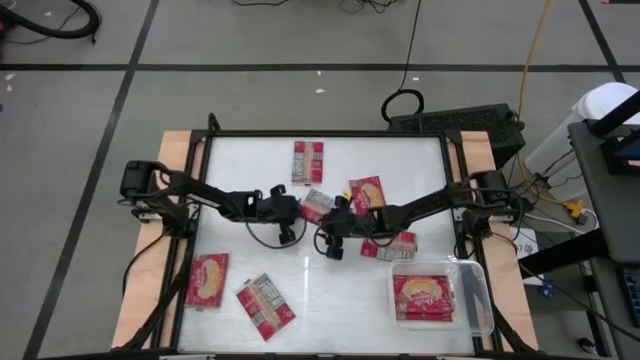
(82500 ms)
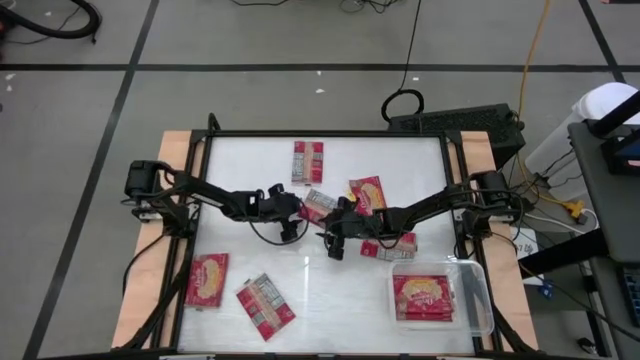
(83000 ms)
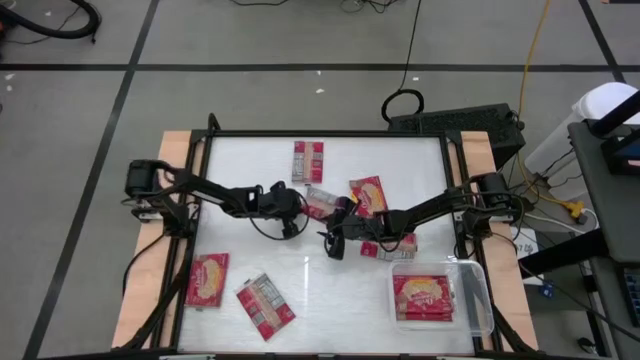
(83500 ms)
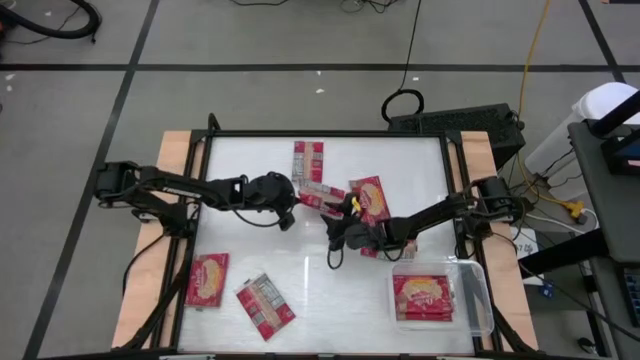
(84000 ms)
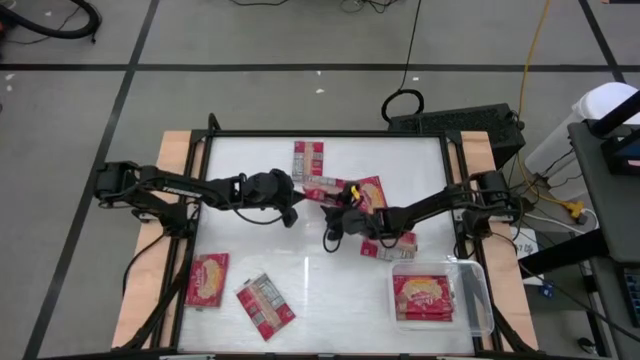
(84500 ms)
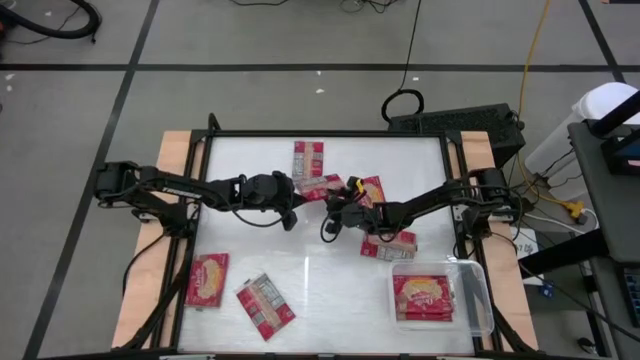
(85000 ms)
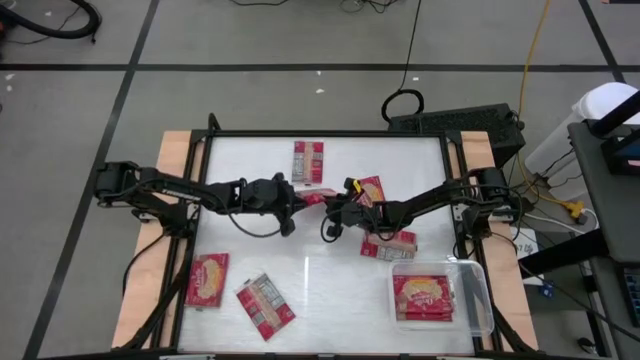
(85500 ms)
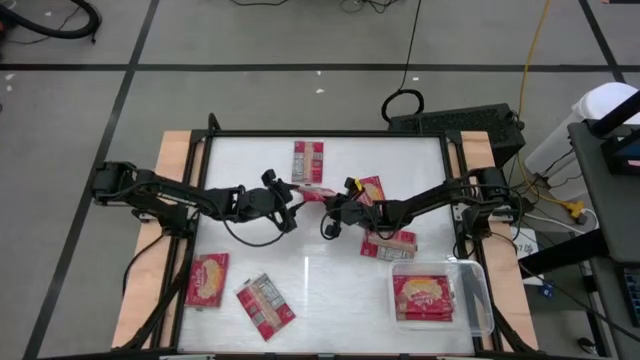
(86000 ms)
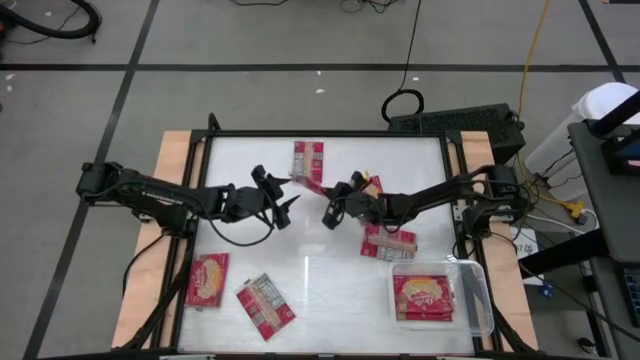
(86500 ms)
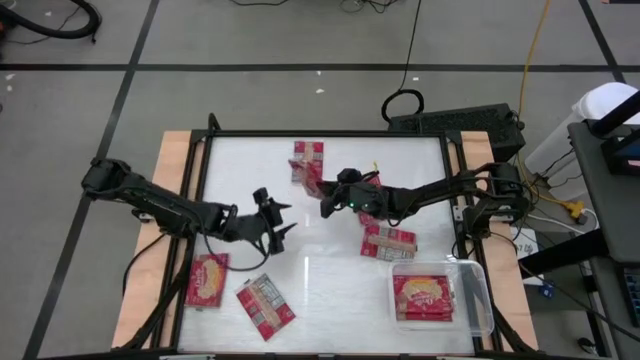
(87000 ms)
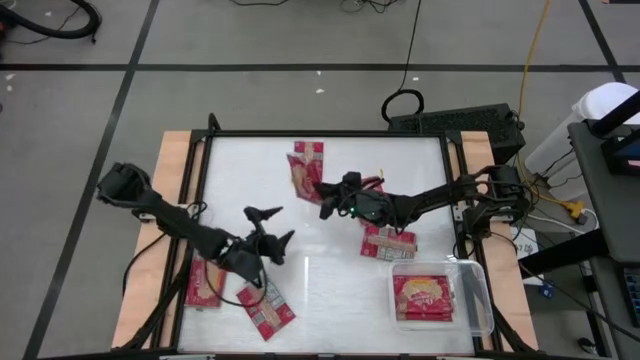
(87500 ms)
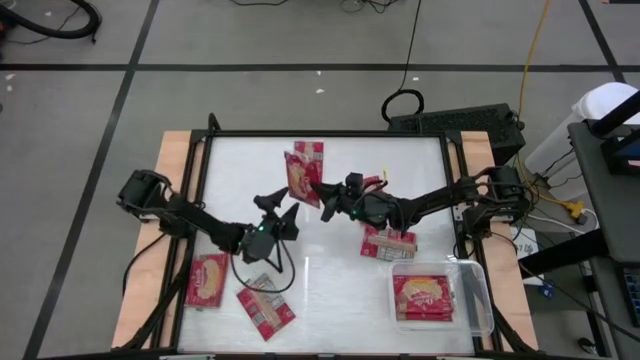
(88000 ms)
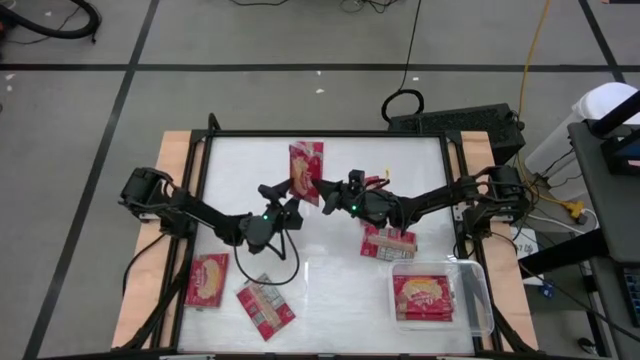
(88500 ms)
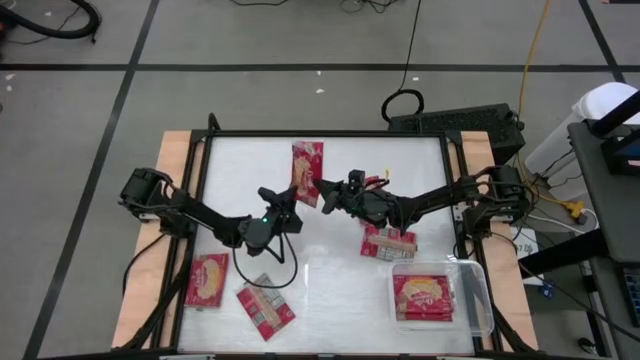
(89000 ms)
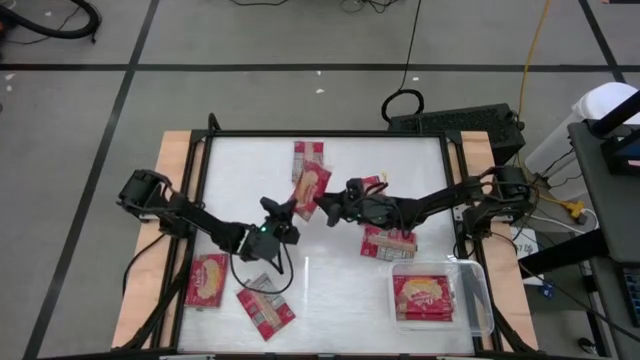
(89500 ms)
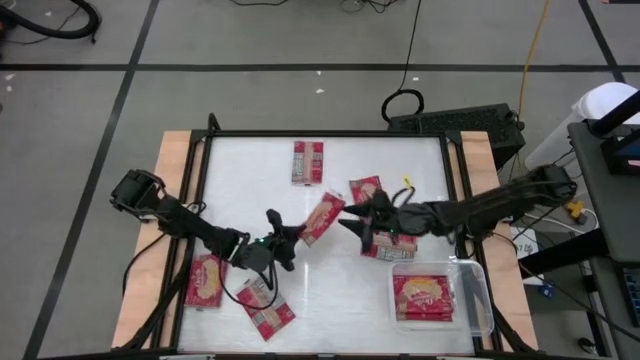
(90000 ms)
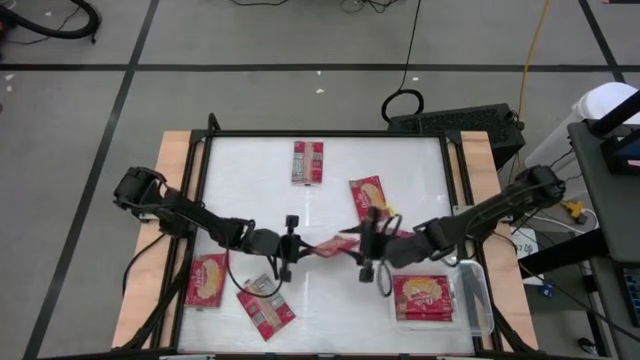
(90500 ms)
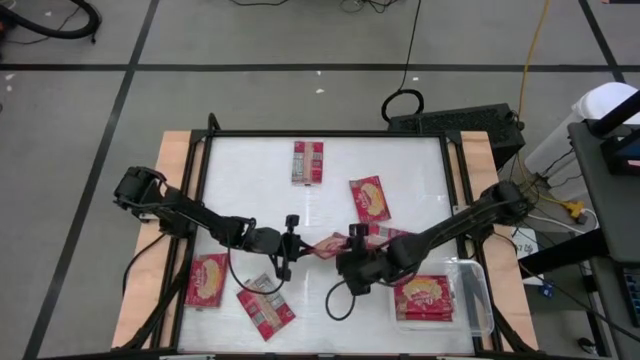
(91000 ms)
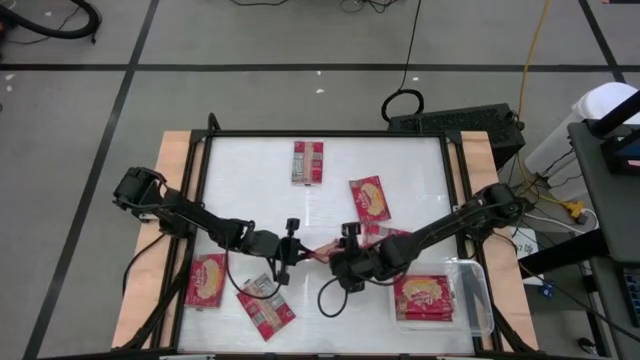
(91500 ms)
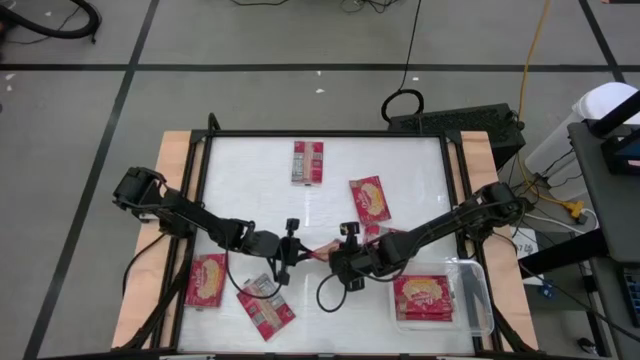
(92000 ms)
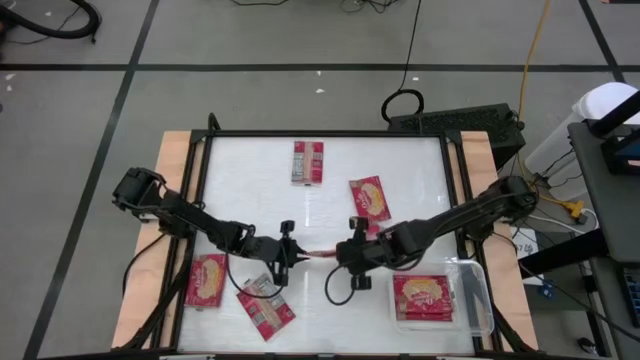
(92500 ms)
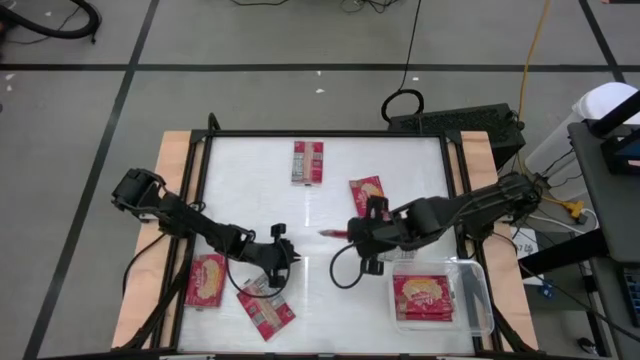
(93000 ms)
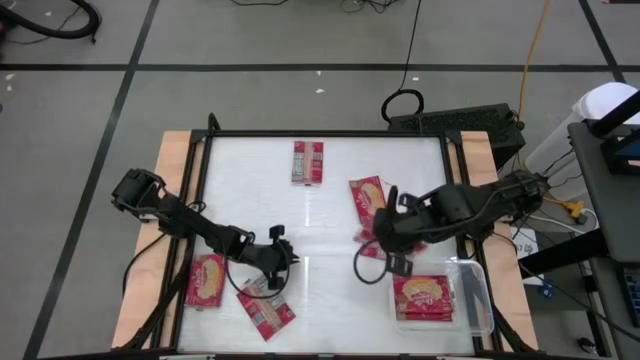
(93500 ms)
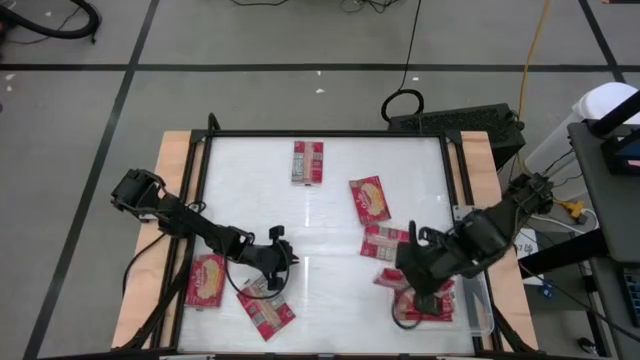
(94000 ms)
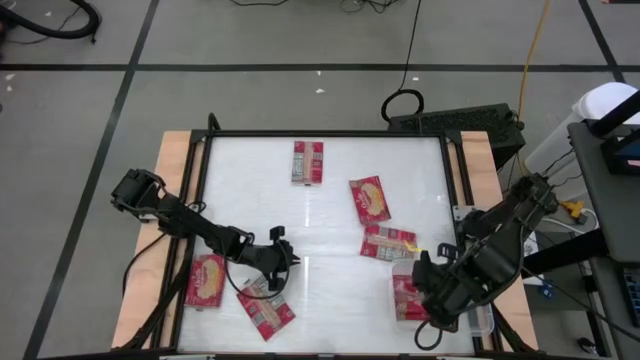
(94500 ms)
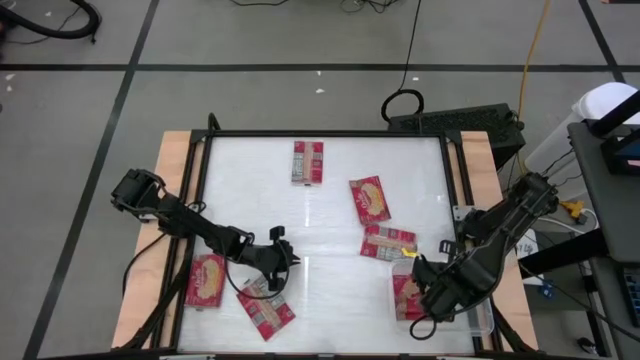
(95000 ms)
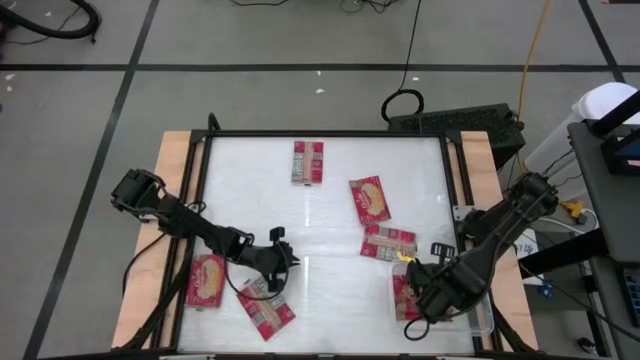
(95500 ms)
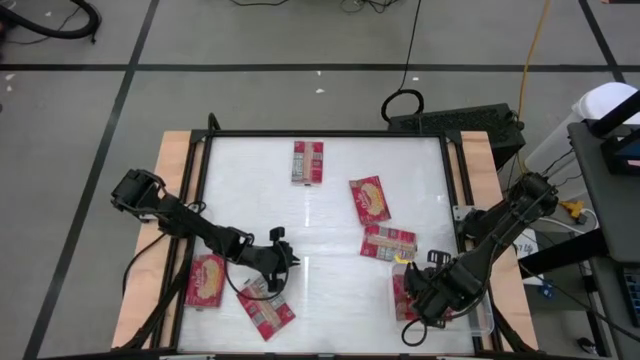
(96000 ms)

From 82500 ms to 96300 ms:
Task: Sort popcorn bags into baskets
Put the red popcorn pack into the transparent bin

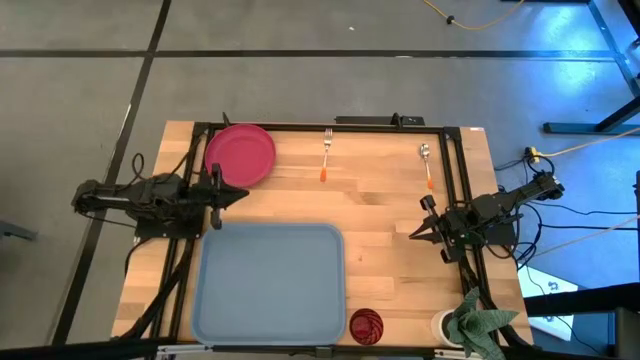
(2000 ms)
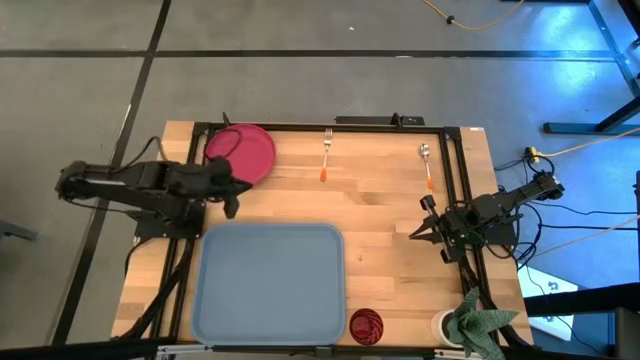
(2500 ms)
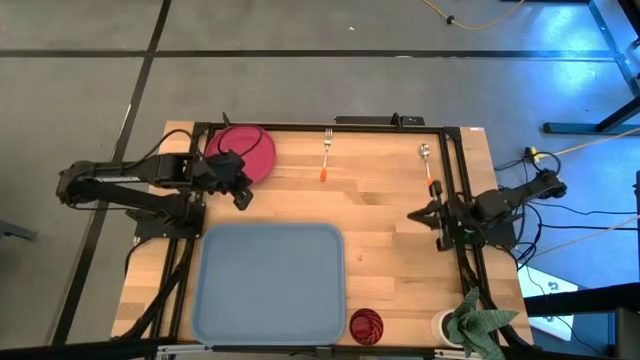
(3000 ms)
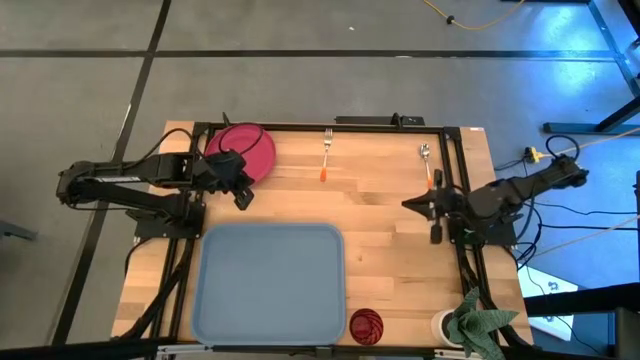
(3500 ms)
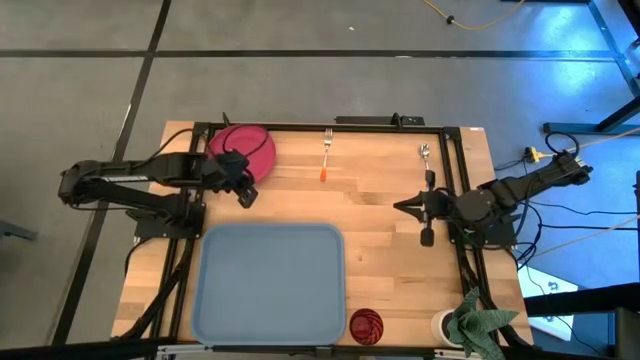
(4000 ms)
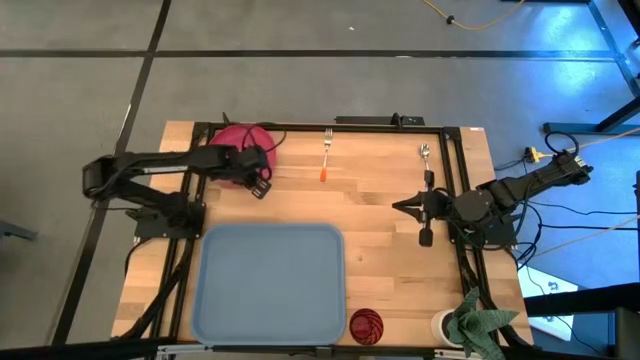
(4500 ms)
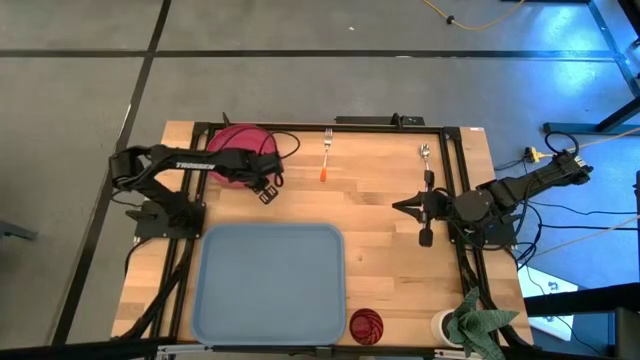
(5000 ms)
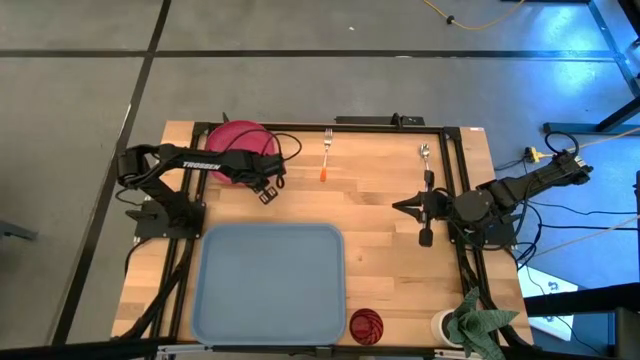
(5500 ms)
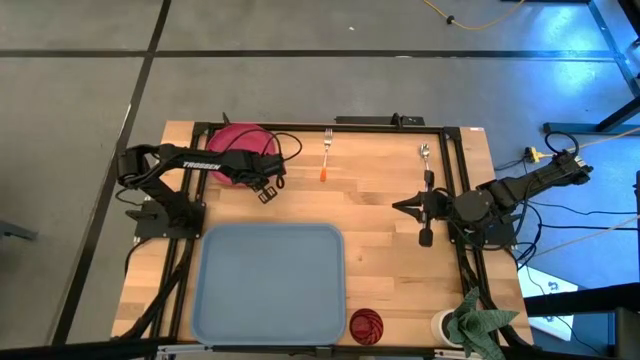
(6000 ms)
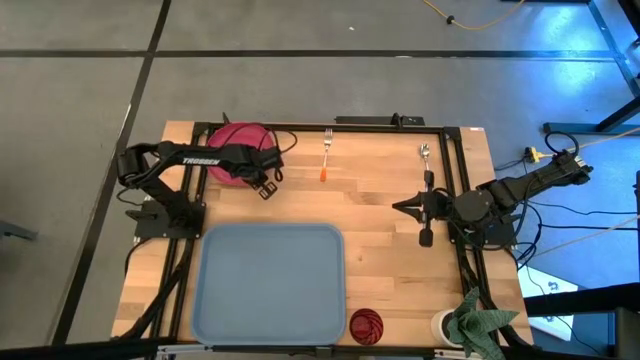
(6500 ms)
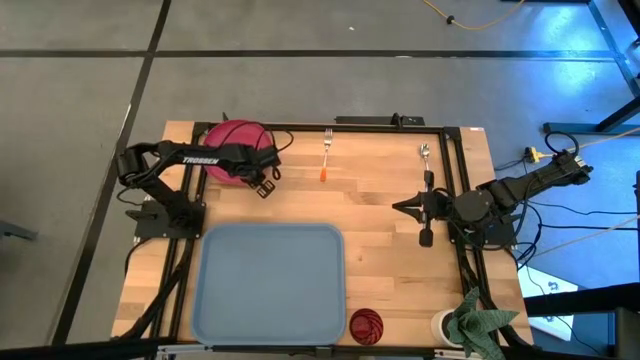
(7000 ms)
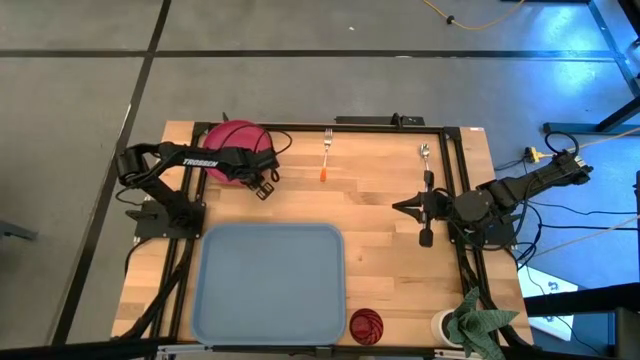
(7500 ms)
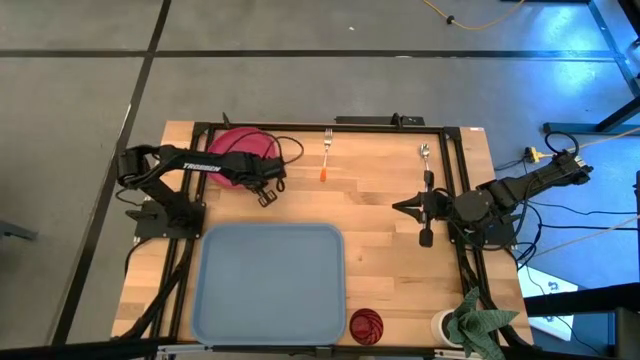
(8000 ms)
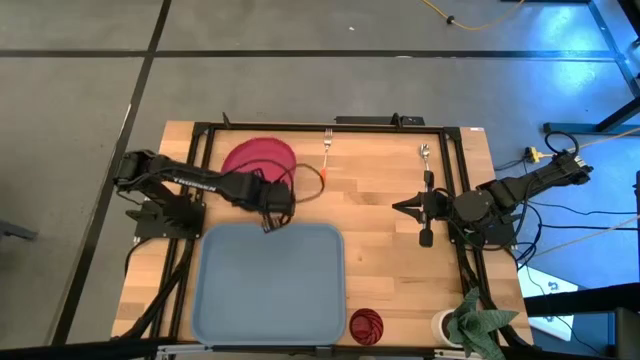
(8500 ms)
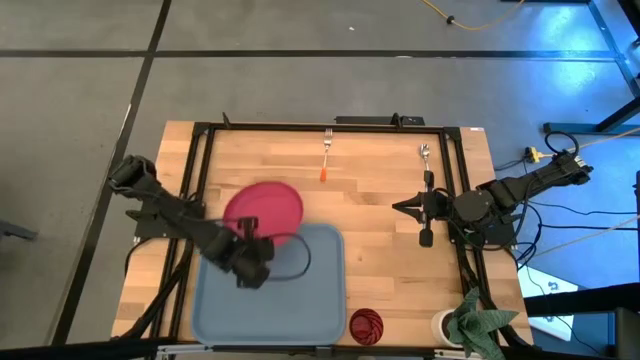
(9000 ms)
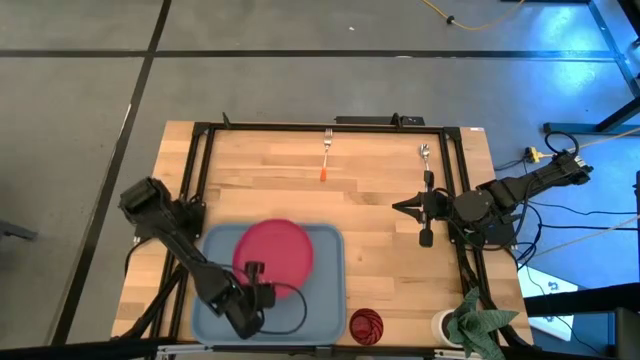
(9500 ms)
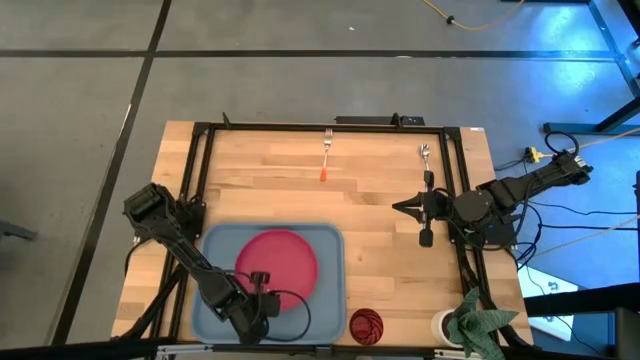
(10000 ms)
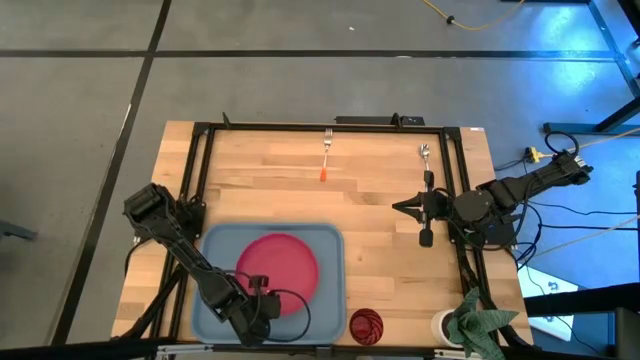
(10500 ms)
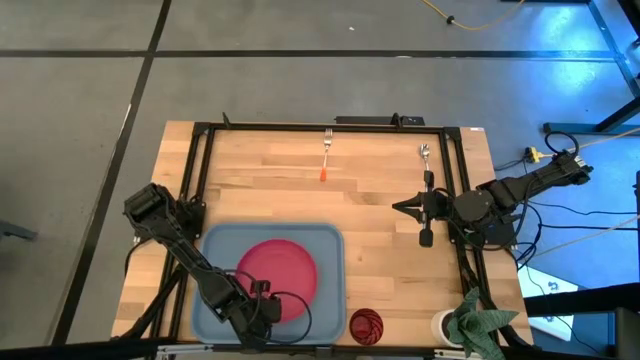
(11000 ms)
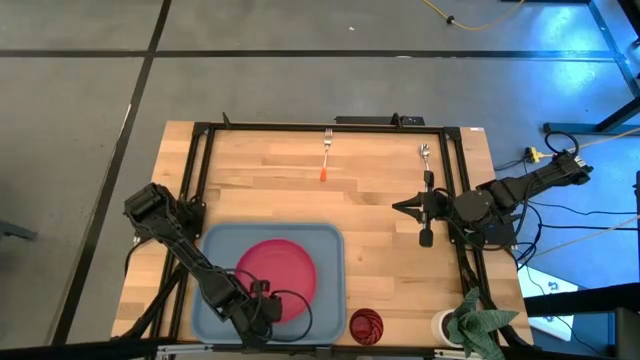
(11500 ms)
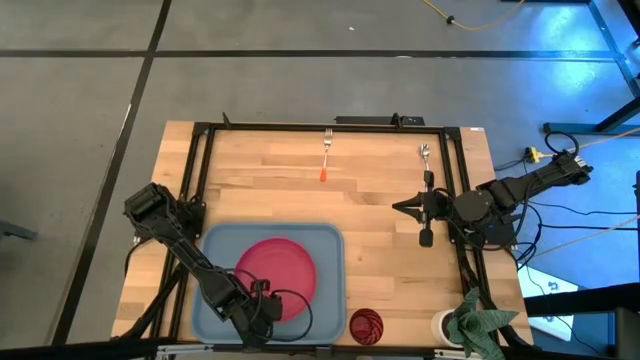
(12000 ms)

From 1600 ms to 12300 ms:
Task: Pick and place plate/cup/fork/spoon on tray
Put the red plate on the center of the blue serving tray
